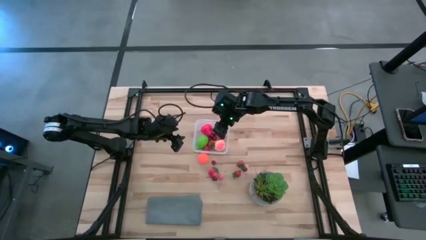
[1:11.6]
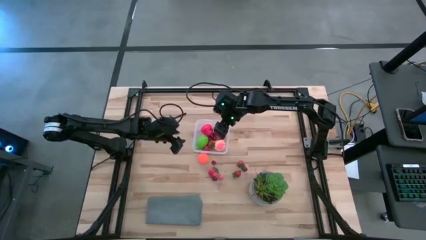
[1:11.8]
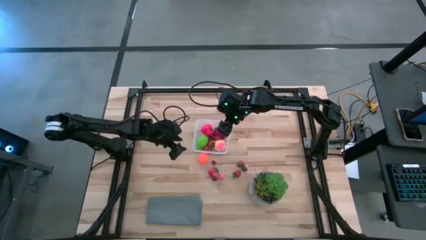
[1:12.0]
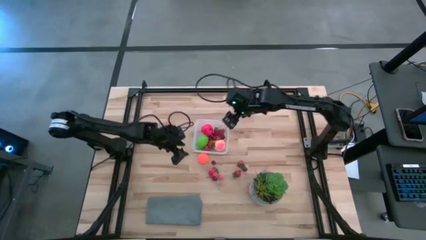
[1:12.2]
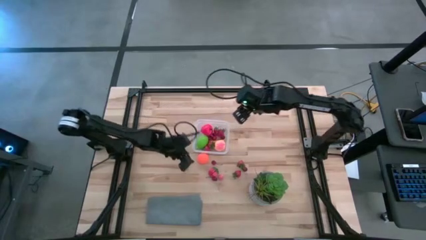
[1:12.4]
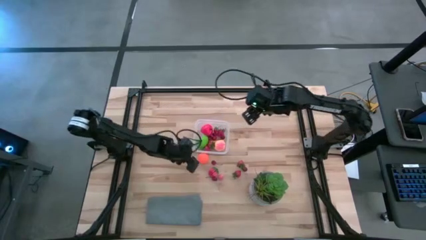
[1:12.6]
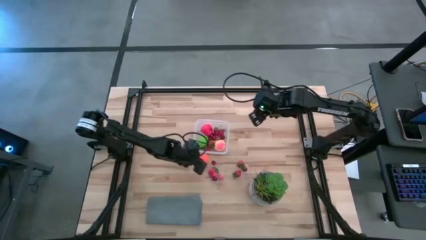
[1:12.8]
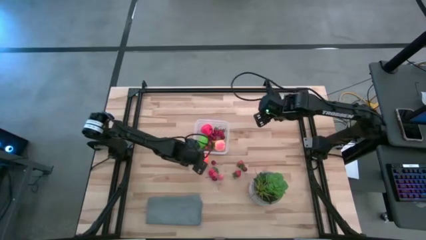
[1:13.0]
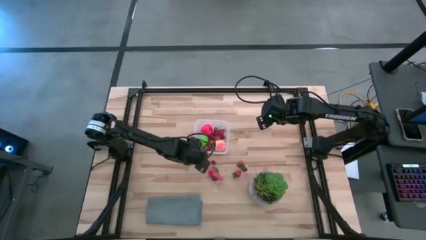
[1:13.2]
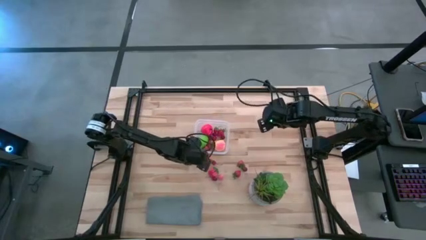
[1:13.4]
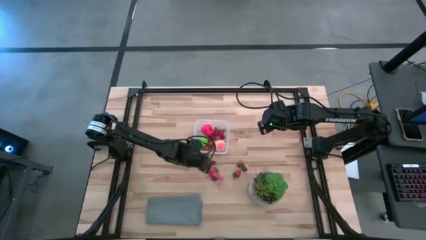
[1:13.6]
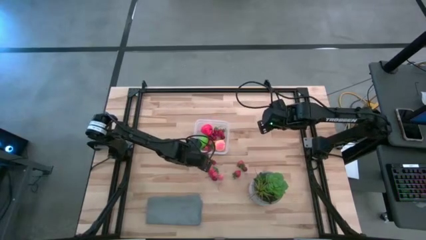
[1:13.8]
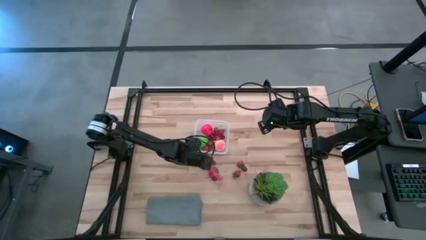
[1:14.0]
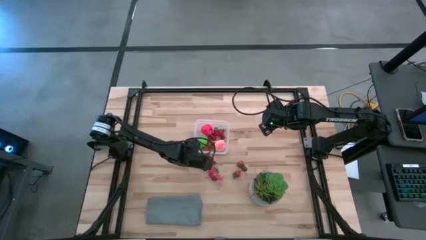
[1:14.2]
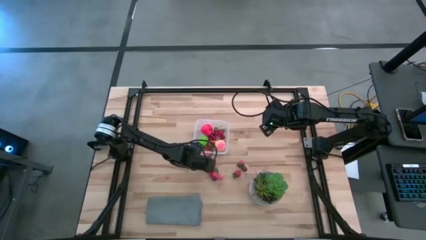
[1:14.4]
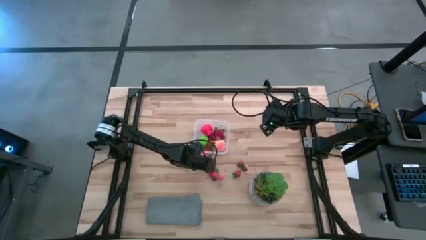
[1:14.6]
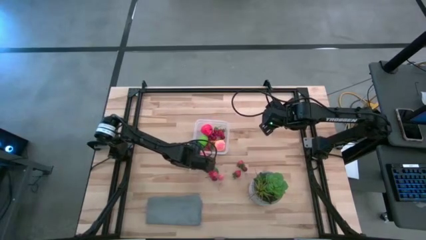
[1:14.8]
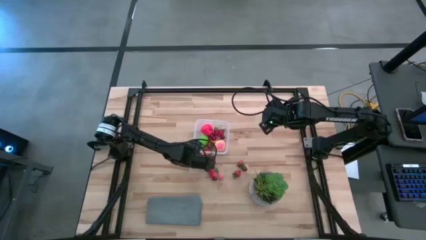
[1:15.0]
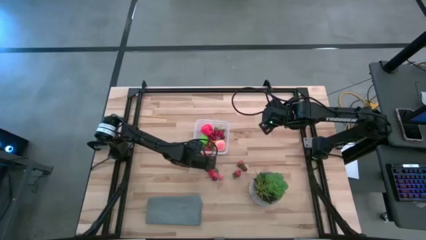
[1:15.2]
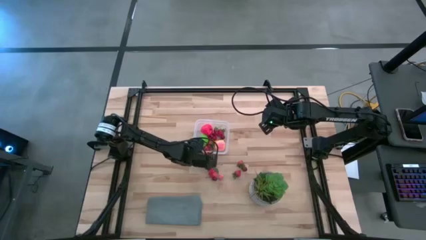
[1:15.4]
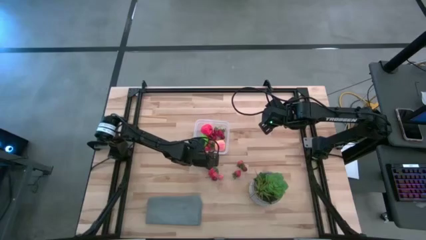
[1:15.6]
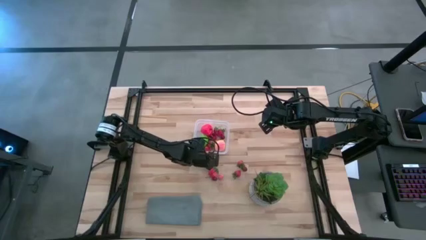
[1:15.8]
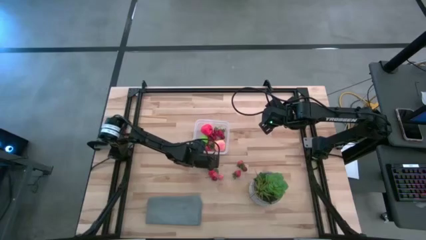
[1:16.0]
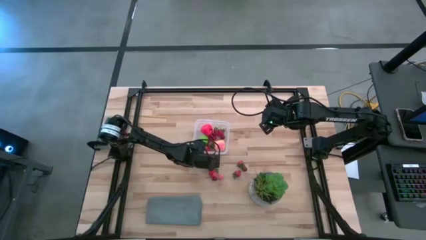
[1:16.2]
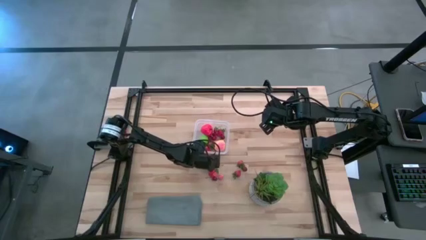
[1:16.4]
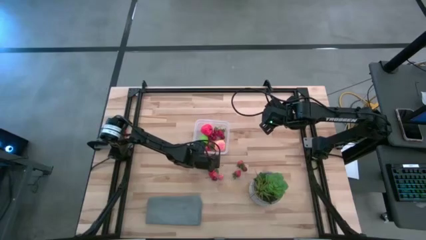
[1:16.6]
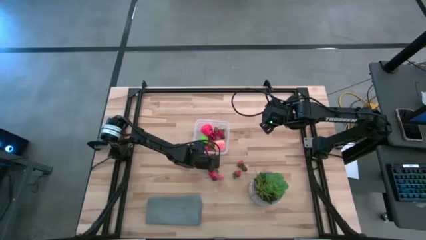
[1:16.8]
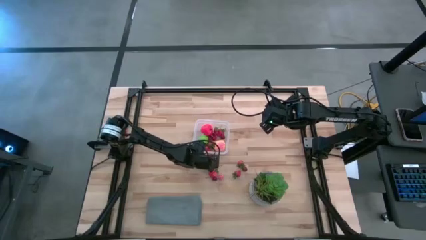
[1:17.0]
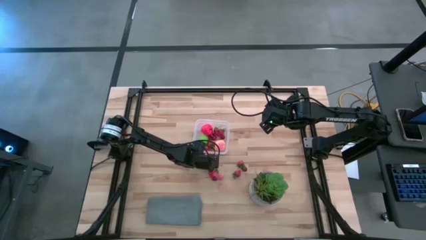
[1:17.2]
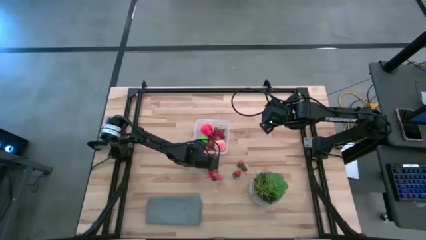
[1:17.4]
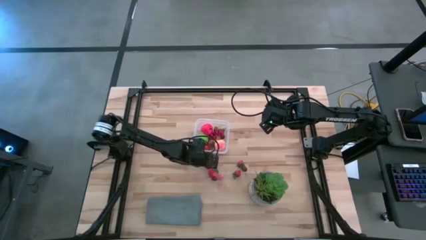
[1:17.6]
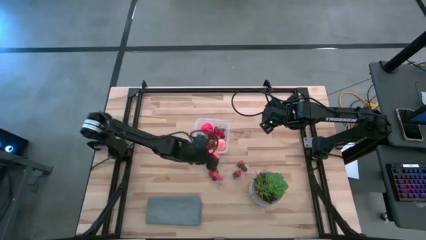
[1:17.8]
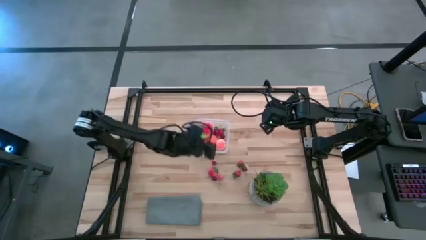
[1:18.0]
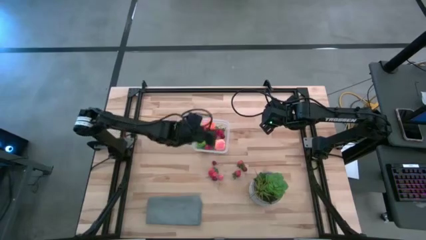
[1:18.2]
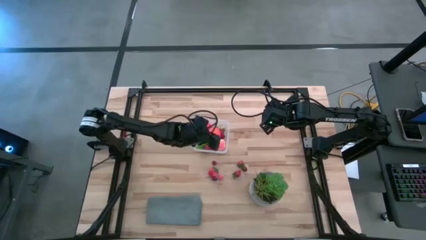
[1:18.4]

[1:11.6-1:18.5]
Task: Pick and placing Produce into tupperware
Put the orange pumpkin into the transparent bin

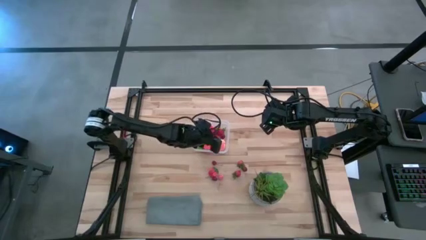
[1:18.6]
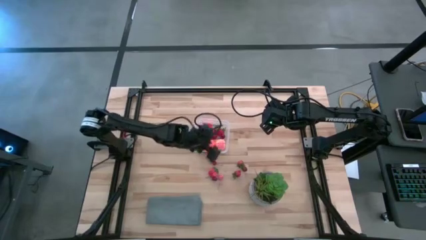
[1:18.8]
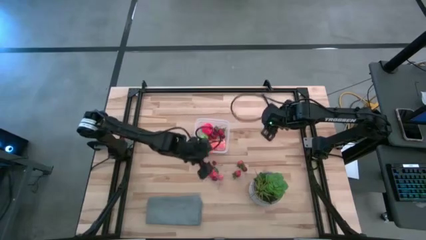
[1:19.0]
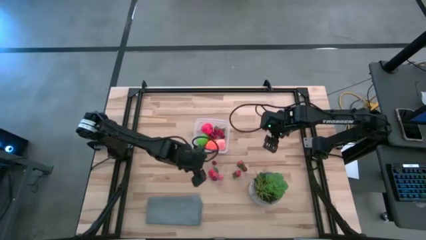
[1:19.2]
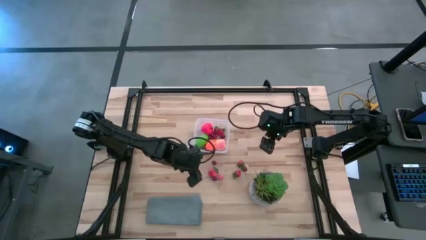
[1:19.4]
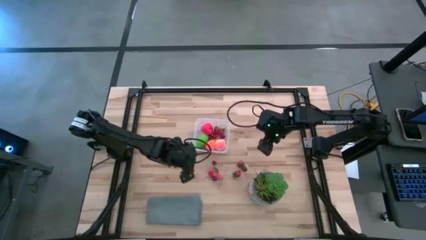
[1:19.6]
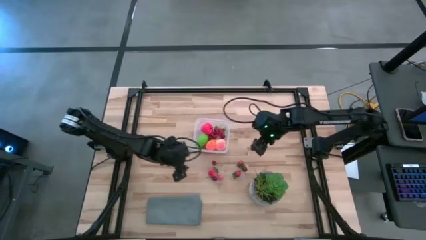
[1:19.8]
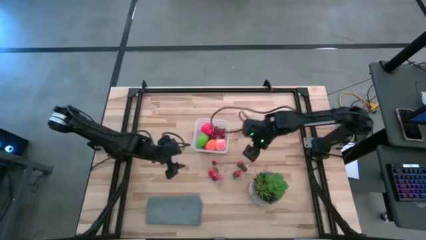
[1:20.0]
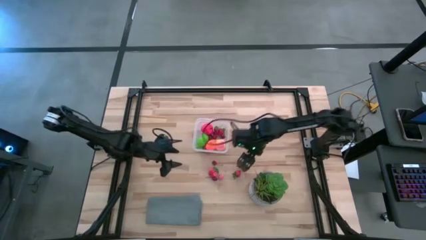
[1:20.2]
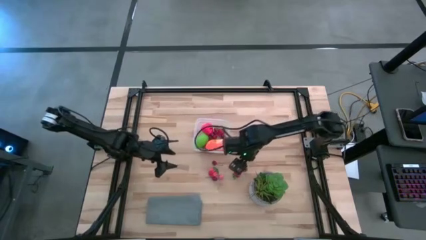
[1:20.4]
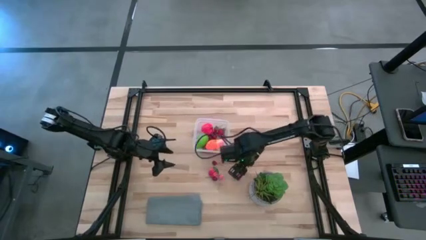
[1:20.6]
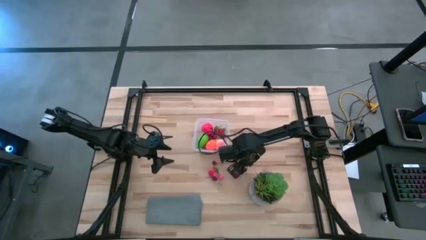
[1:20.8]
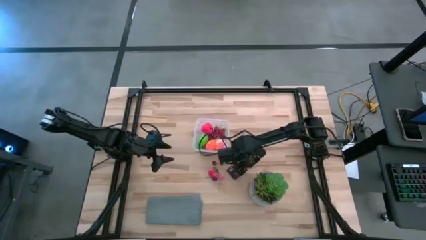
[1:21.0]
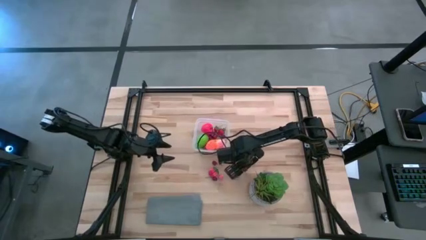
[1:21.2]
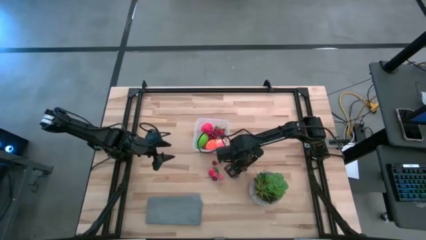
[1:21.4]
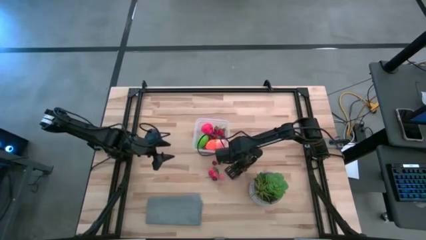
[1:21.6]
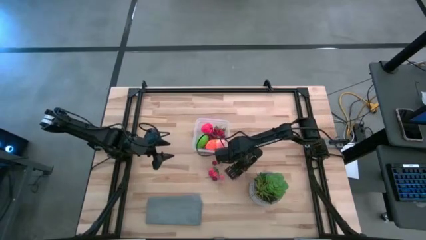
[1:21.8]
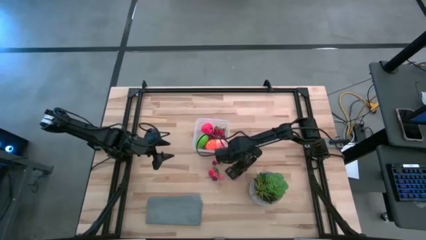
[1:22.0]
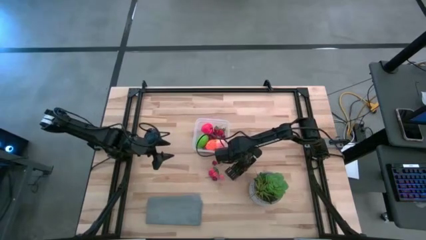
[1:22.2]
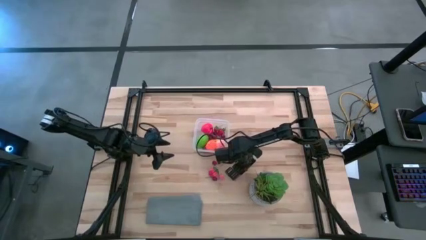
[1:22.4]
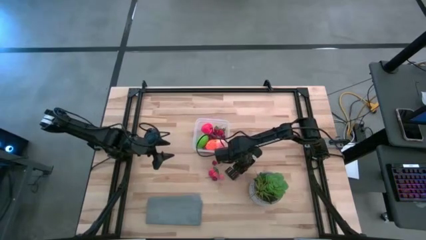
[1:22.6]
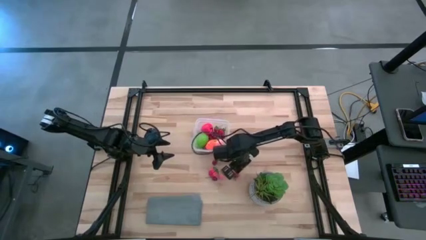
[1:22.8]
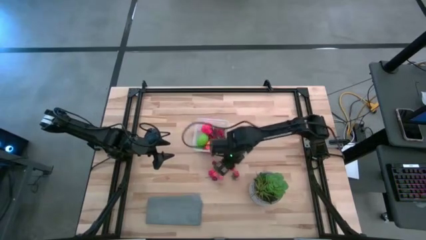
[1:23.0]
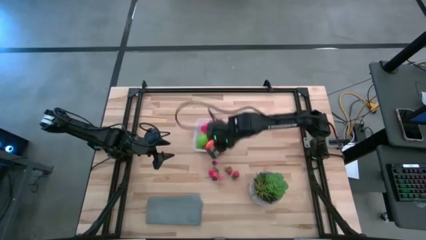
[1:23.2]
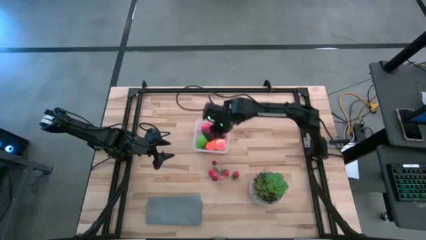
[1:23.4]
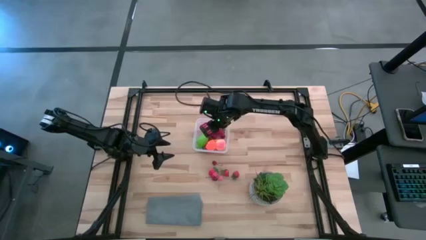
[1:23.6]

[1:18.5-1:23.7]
Put the red cherry into the transparent bin

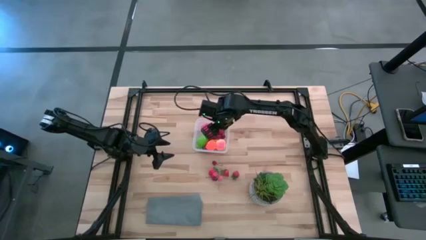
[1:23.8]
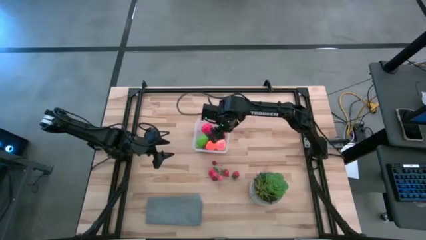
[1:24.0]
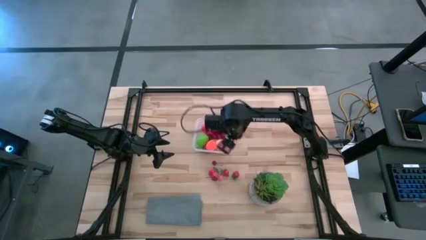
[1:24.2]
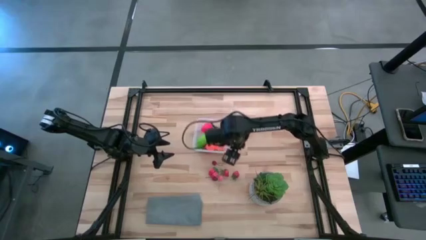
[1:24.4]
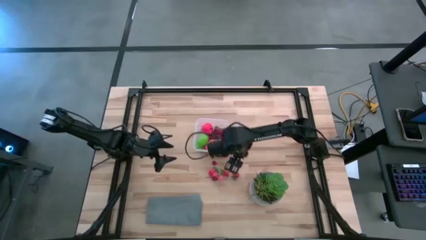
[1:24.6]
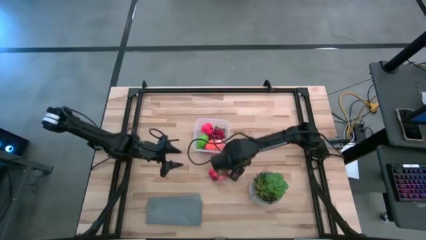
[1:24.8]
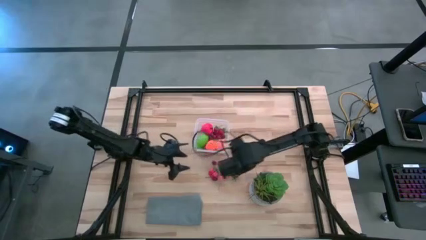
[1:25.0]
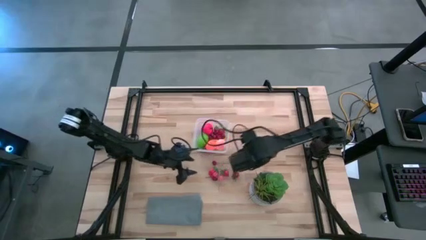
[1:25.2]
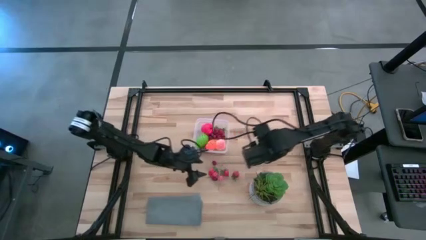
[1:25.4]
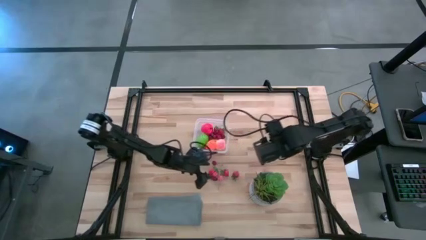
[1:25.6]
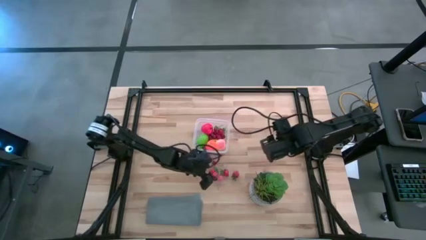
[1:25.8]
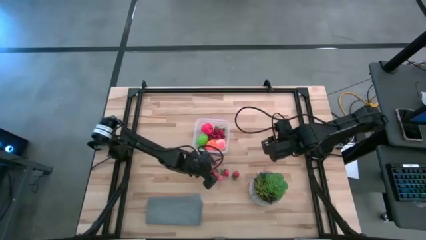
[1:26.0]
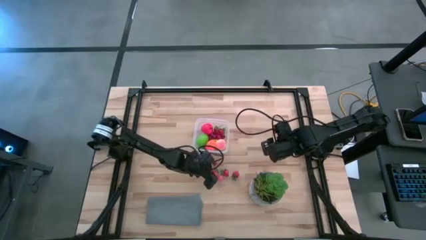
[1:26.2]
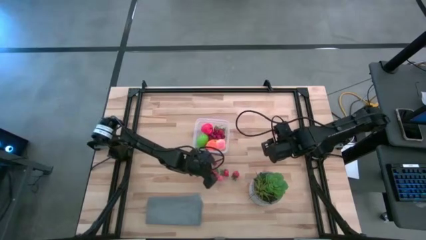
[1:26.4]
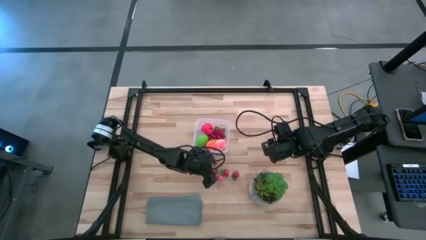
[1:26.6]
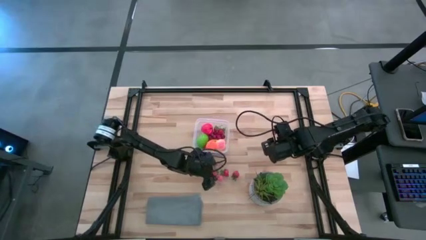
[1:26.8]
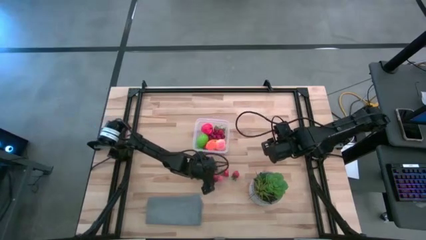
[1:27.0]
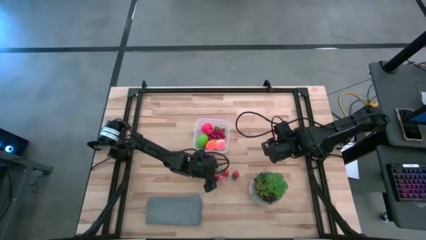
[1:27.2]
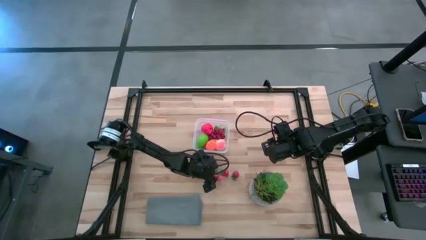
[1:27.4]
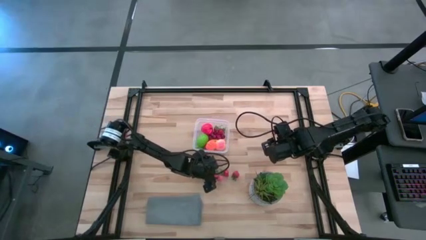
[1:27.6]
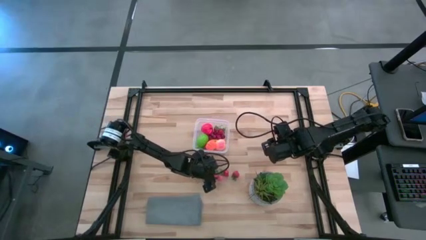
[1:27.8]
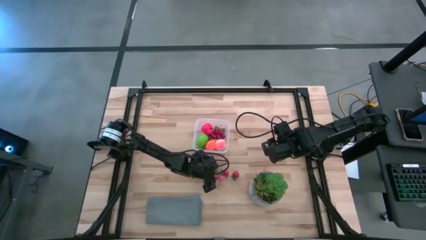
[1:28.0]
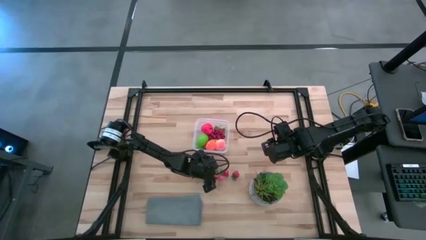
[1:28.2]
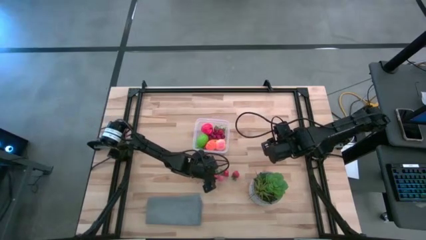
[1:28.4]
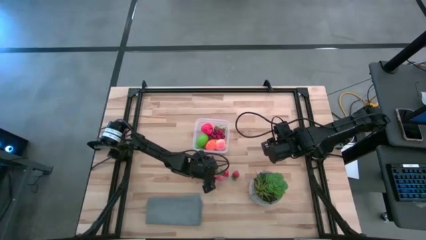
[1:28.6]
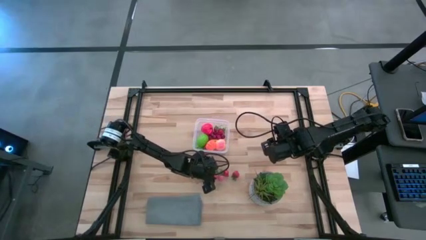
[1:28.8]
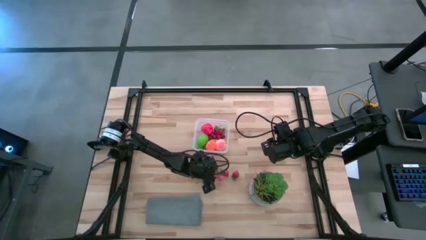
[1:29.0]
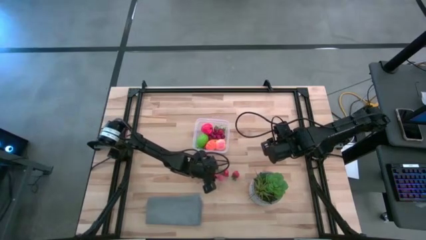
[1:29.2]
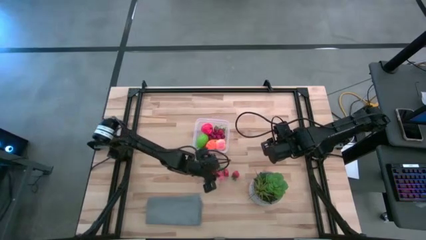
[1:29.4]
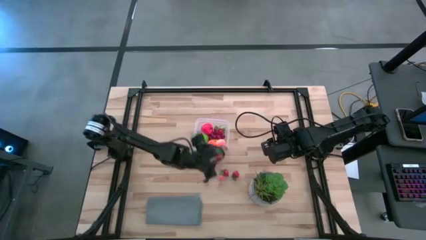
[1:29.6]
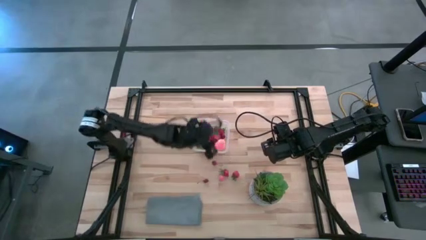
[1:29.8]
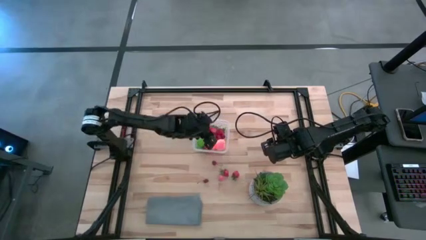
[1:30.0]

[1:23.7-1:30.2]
Put the red strawberry into the transparent bin
